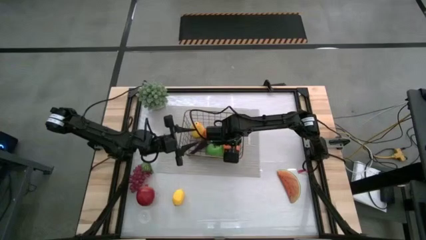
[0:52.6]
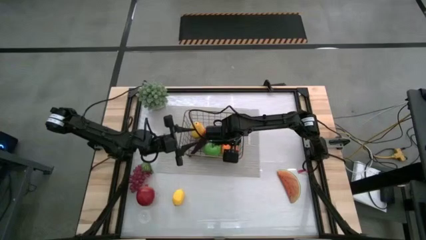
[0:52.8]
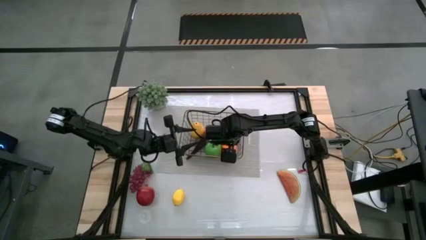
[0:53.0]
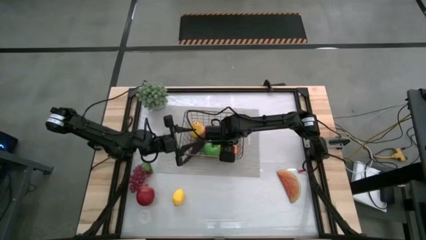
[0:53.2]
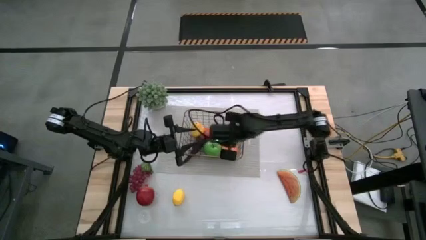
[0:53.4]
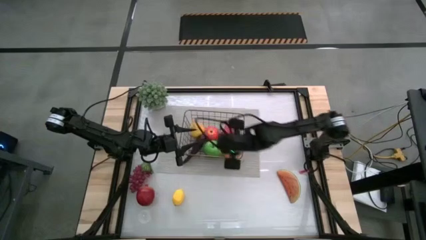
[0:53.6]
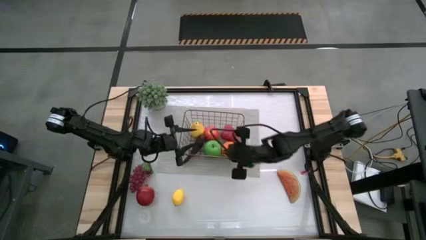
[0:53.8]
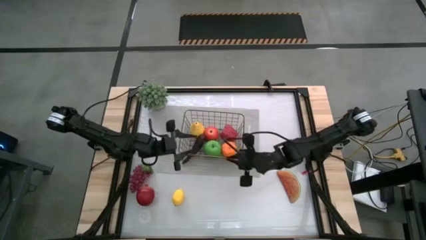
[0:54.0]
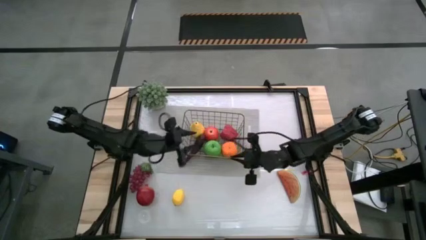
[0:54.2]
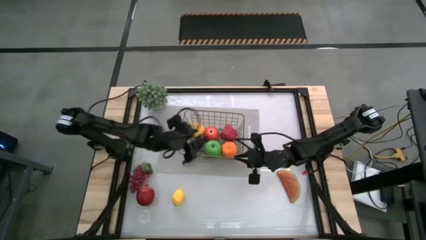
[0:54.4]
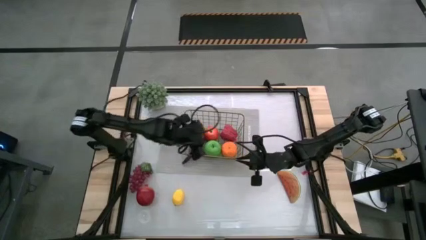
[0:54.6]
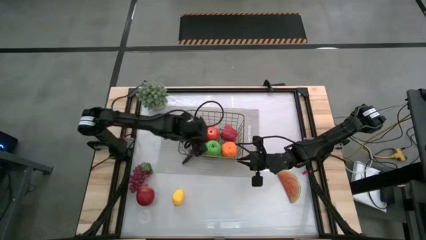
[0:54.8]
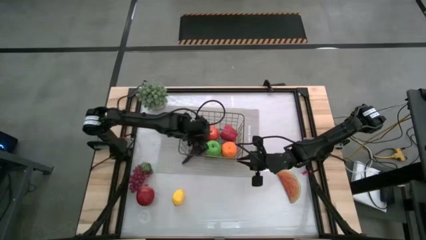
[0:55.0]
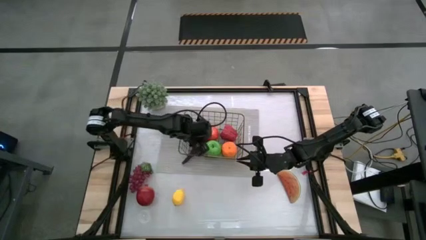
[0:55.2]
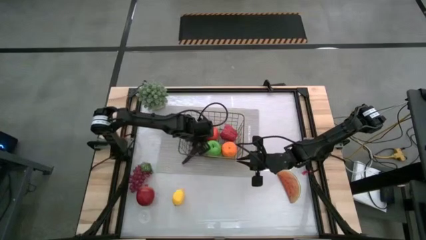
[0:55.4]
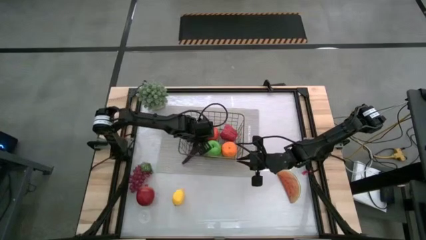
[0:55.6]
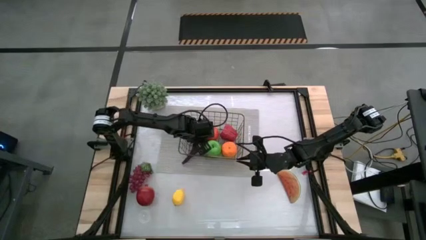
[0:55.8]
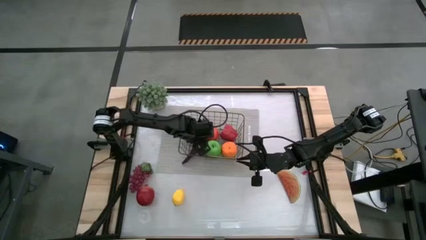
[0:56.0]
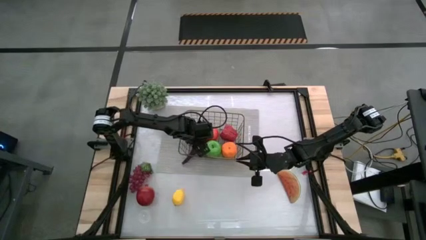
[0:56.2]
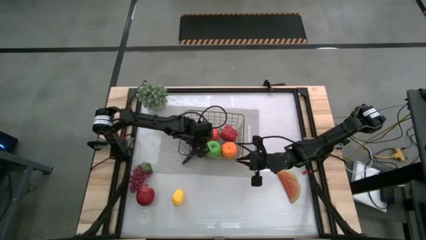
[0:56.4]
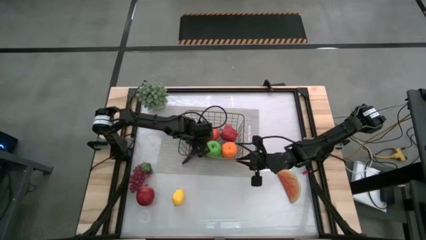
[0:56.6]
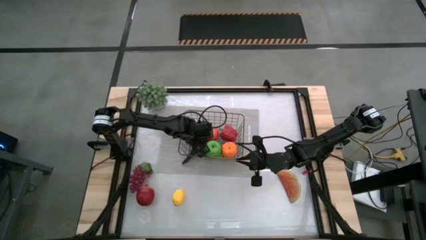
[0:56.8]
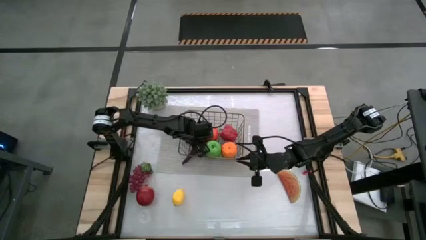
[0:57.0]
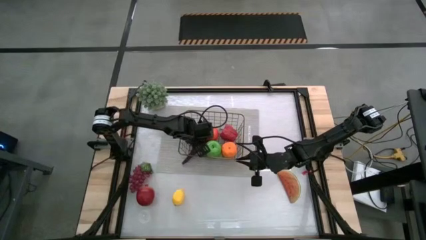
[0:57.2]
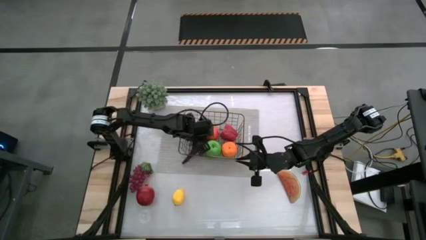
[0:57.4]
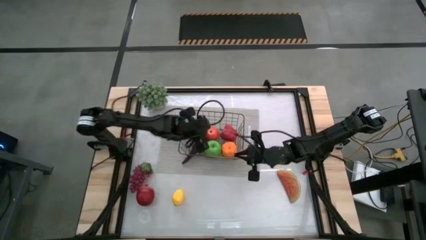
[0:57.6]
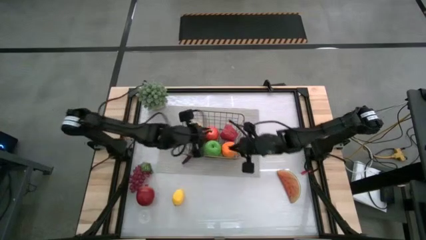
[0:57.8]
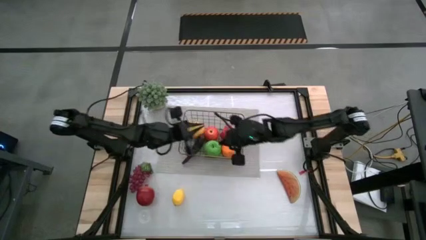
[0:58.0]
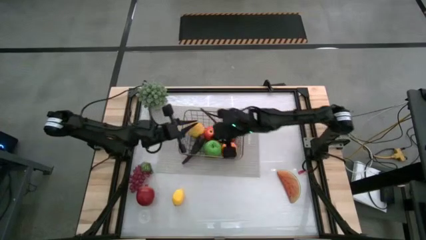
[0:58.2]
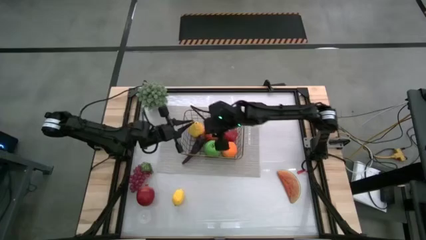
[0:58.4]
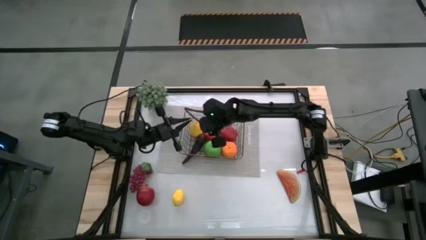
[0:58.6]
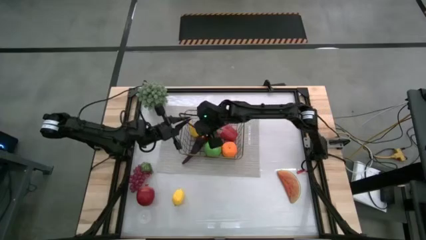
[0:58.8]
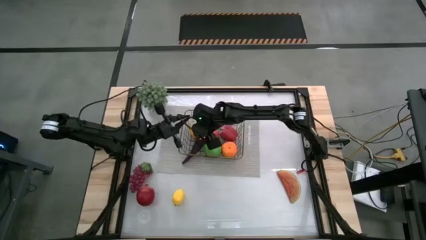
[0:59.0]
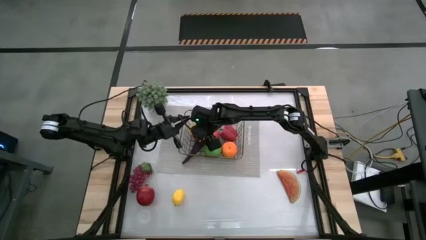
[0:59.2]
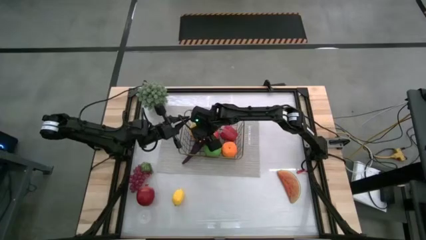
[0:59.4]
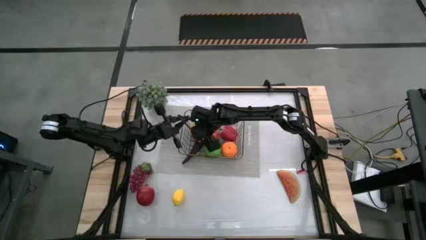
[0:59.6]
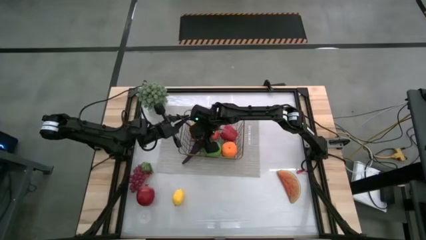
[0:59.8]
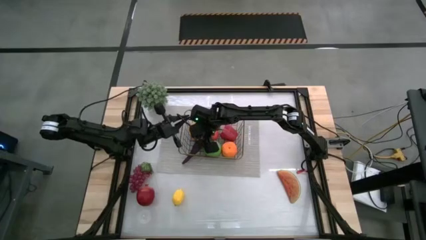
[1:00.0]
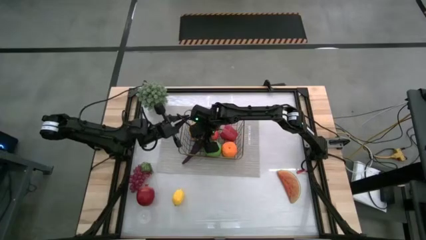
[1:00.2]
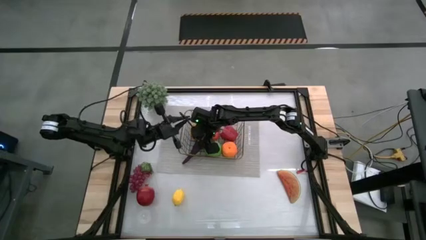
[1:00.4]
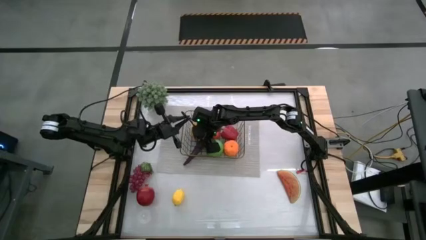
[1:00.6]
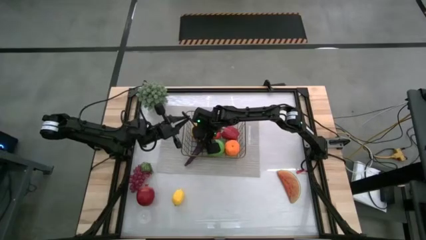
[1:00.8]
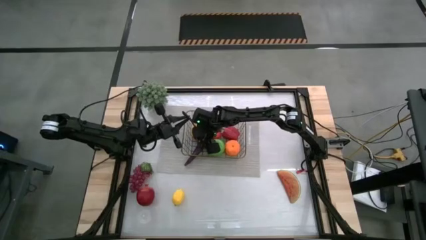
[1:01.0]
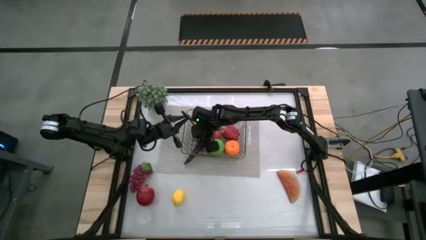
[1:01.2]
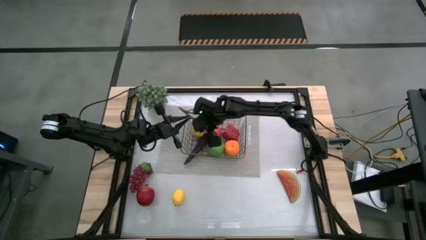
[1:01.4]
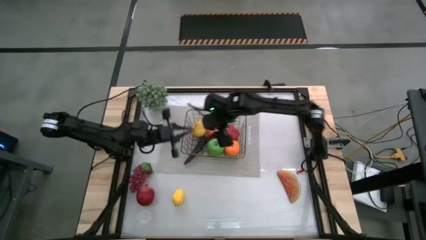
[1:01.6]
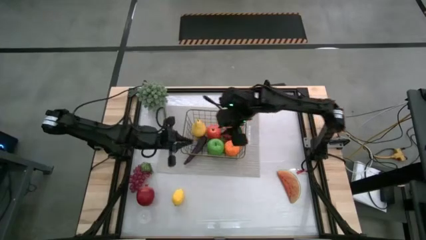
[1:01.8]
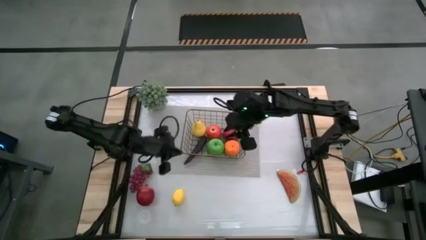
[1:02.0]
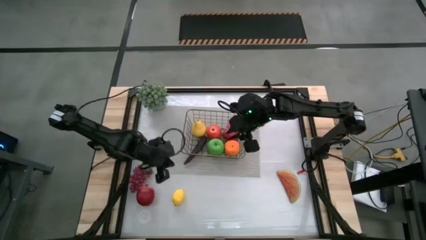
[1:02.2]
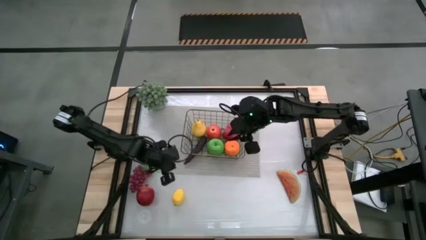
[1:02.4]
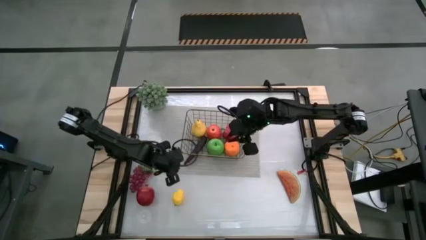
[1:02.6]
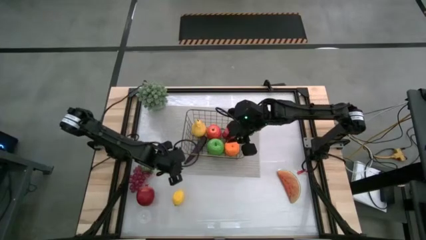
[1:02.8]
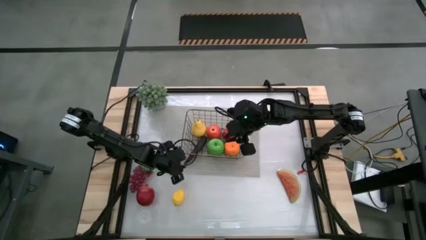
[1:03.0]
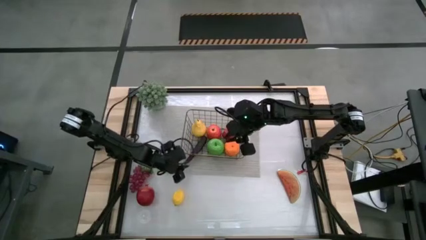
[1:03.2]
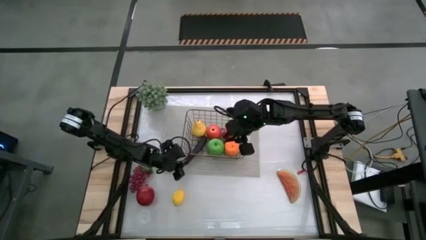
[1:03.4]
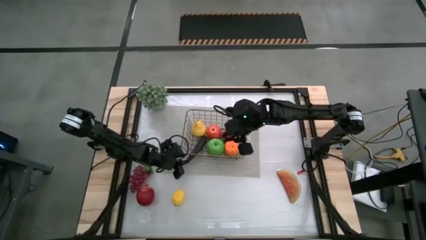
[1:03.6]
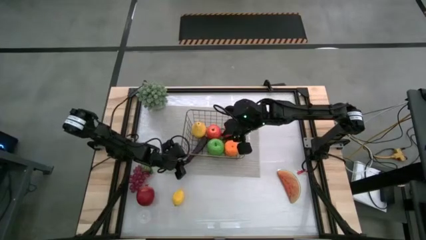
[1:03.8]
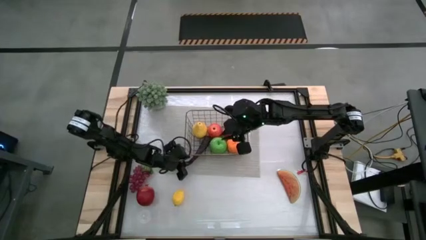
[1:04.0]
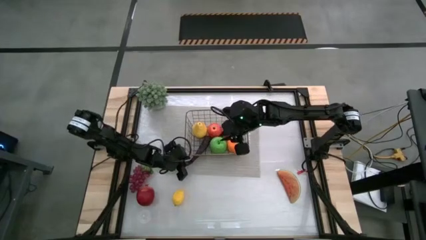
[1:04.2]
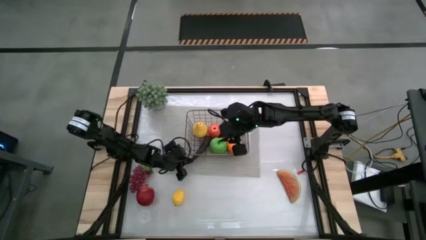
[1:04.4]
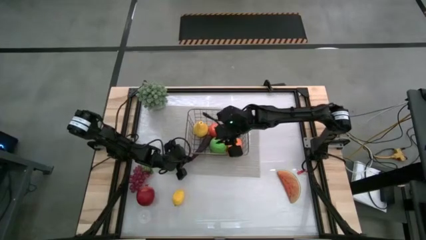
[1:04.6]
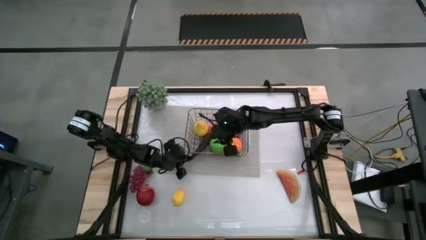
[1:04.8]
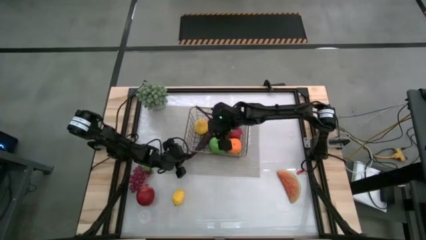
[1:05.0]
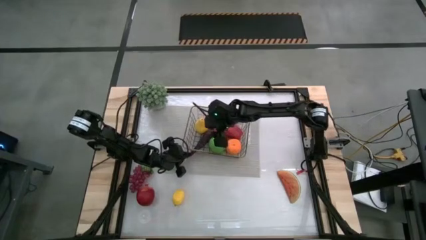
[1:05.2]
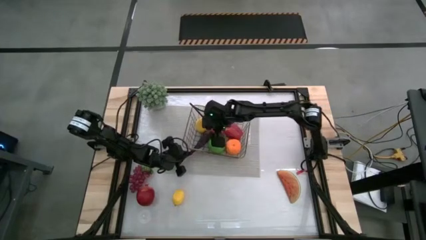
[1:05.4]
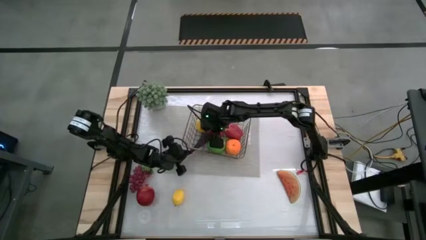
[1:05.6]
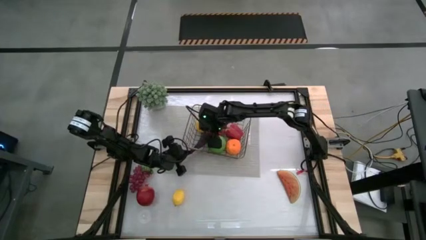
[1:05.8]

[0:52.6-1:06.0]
Task: Build produce basket
Adjust the eggplant in the wire basket
